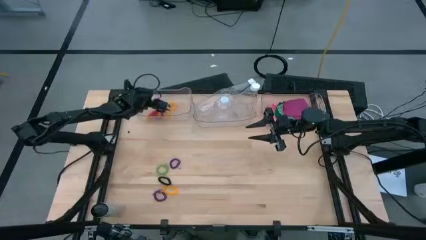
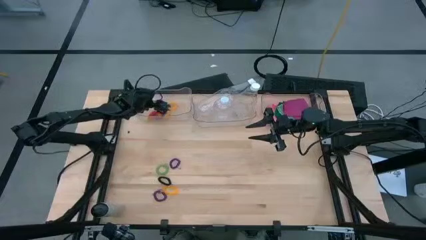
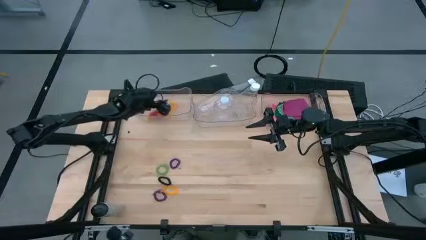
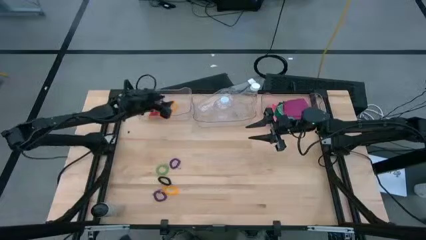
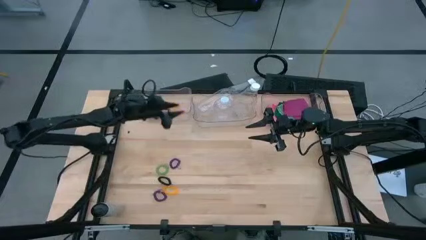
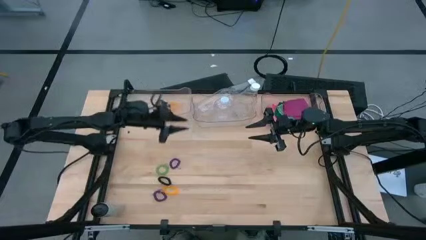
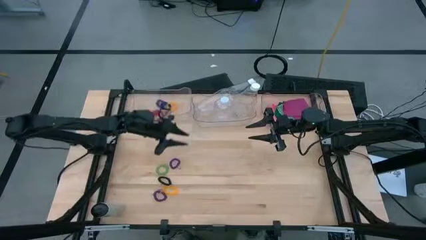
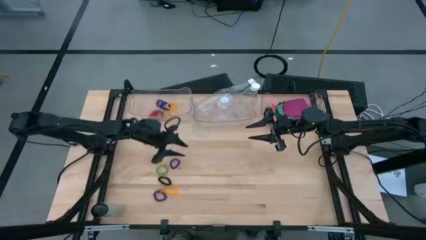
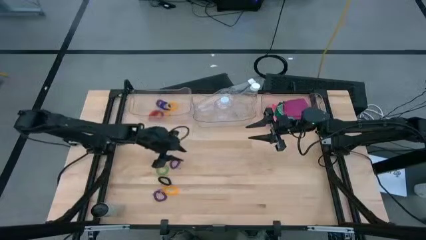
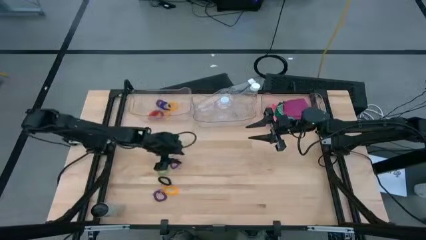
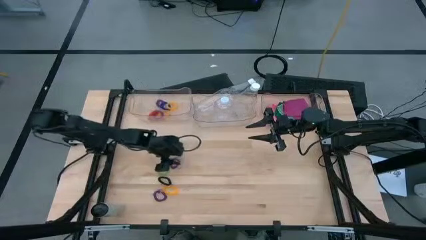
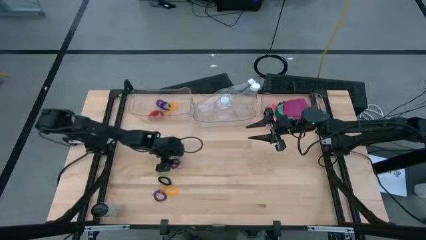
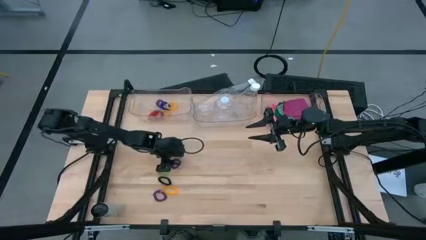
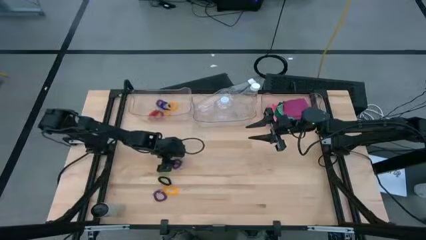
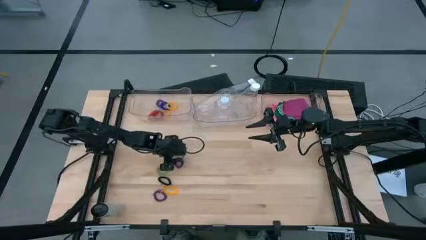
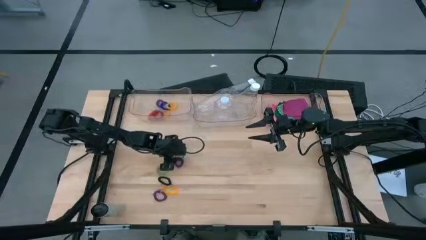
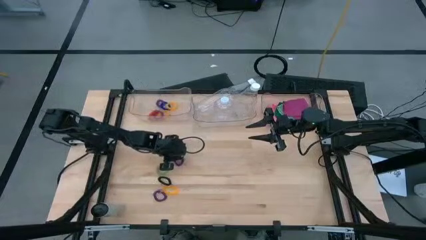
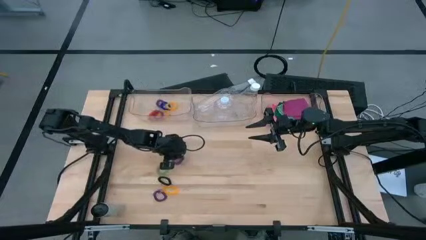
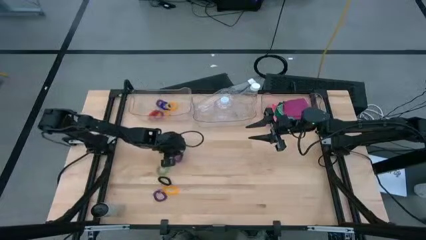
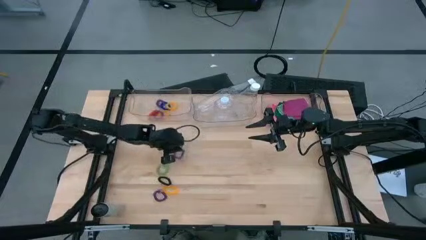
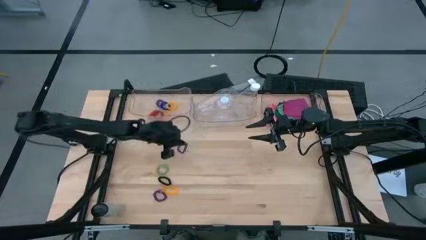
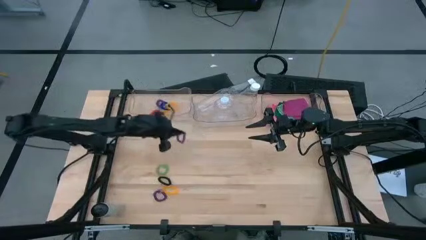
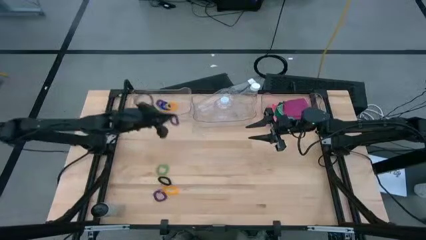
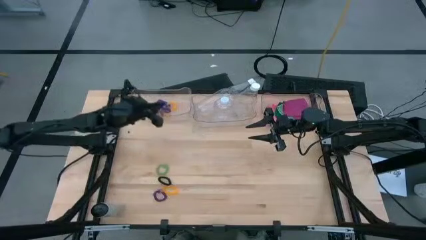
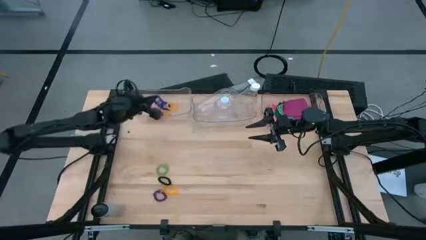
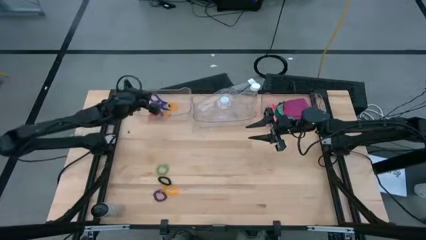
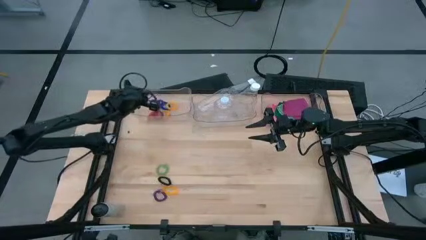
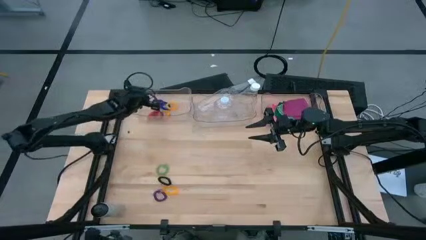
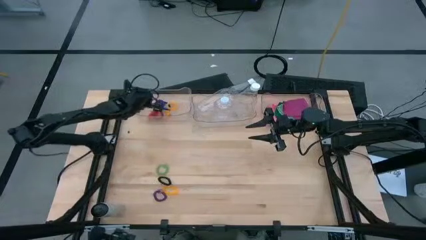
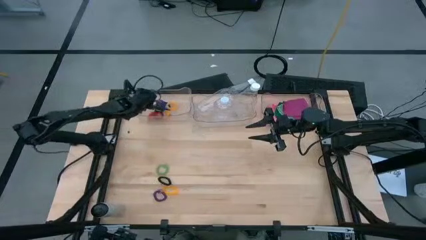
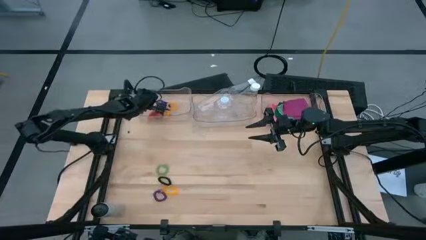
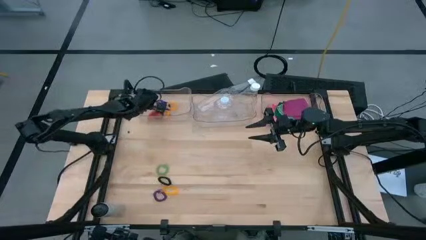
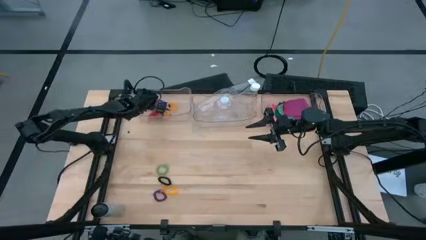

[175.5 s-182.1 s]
Task: Pick & Place Sports Items
Put the top violet spring keychain into the left transparent bin

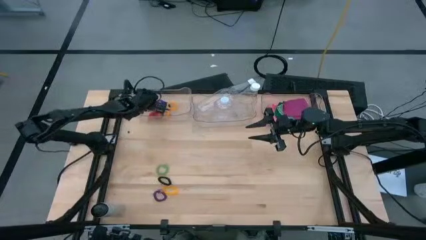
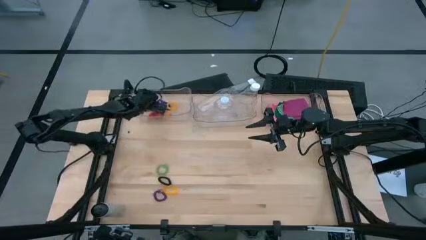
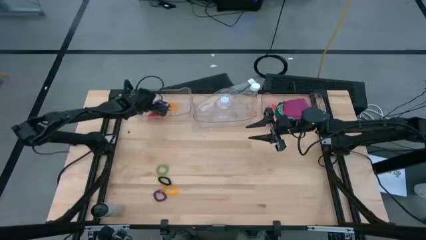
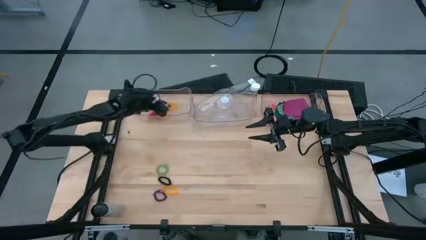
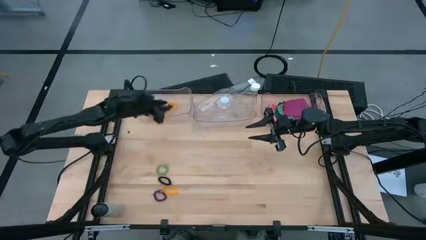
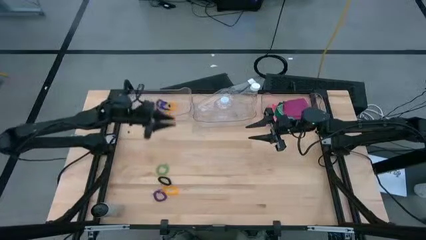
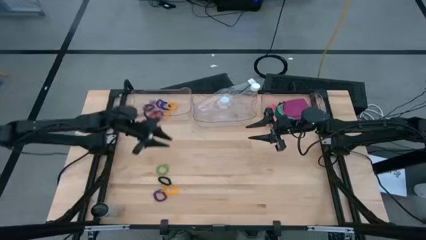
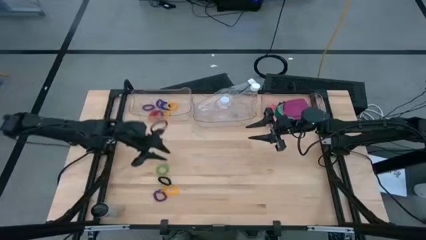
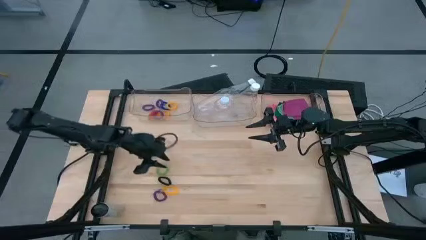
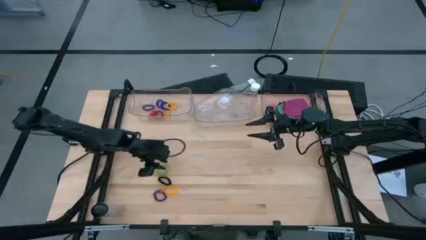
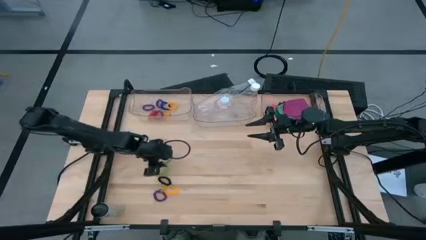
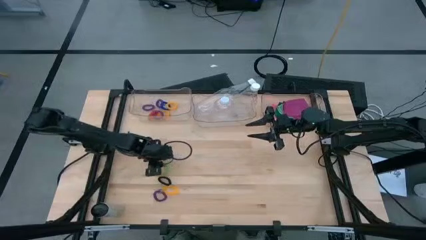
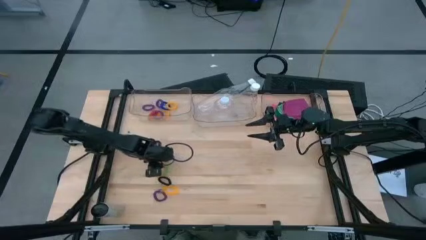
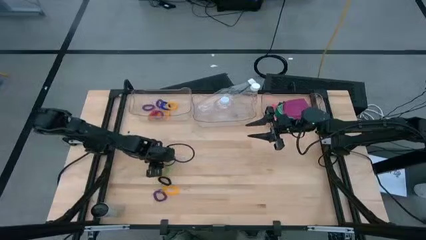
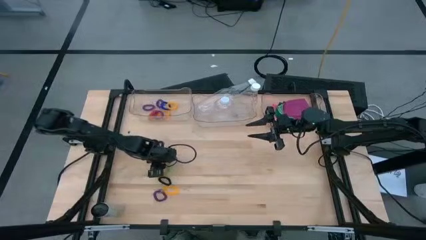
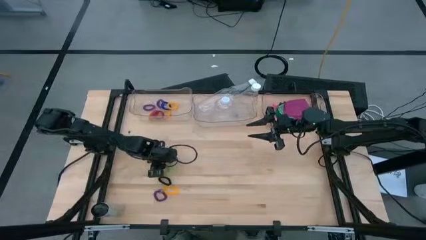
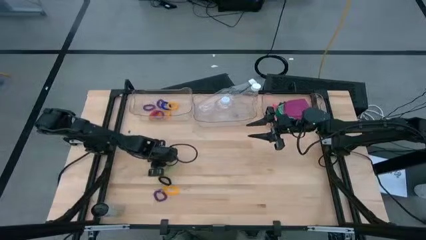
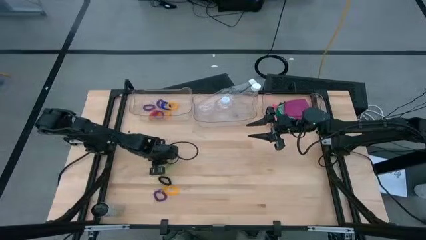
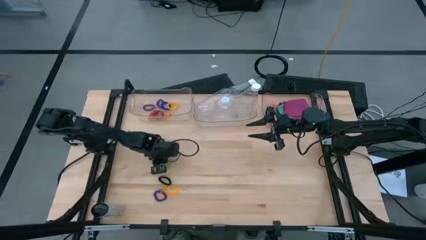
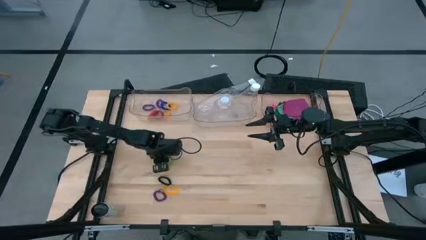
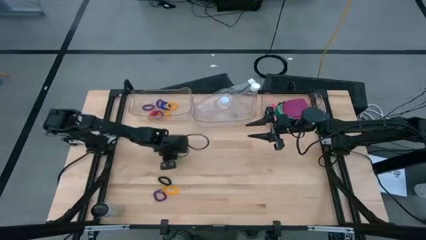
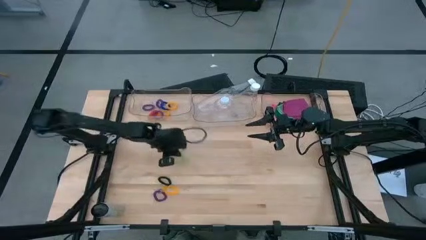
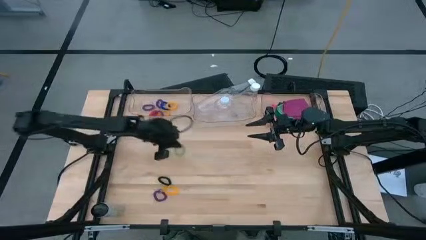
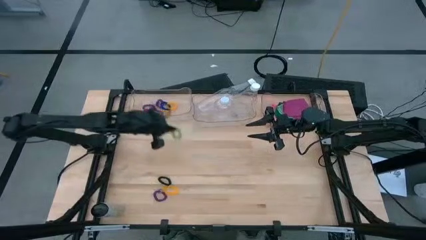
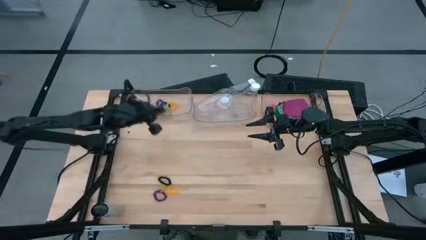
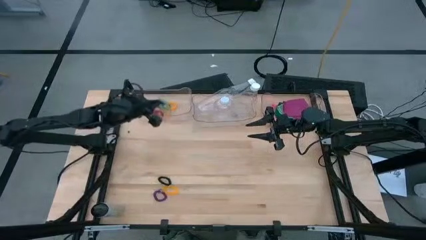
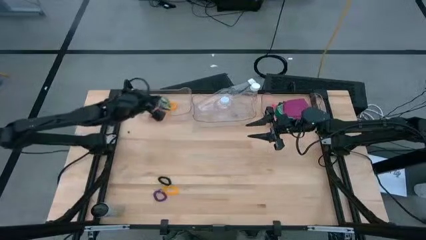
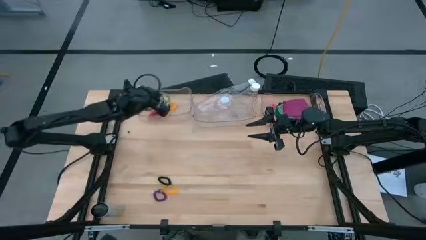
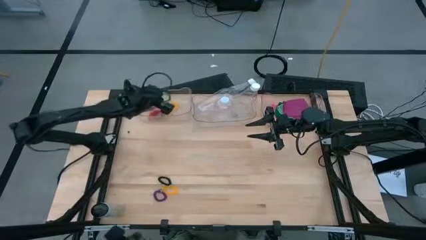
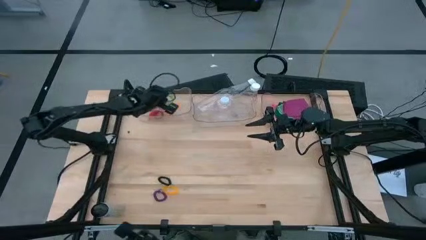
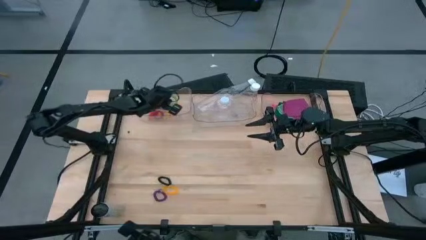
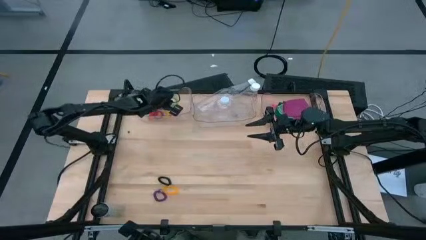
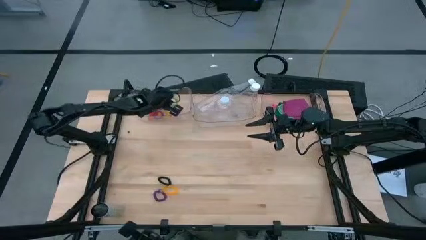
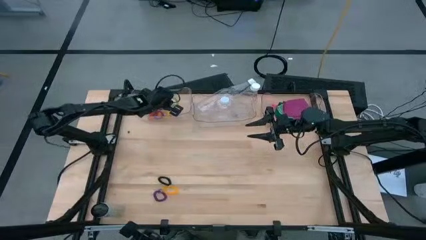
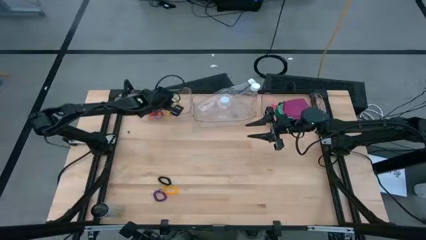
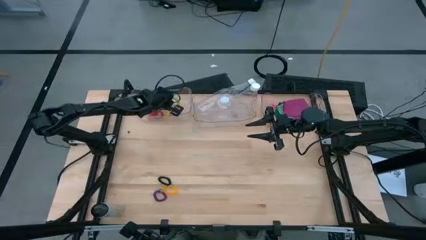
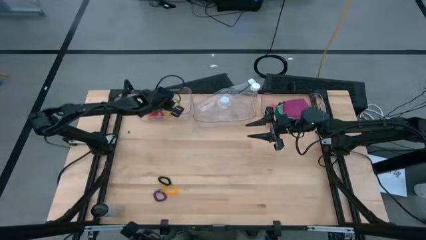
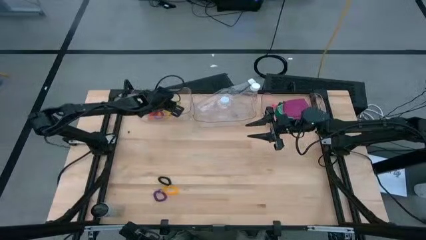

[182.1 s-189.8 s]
Put the green spring keychain into the left transparent bin
